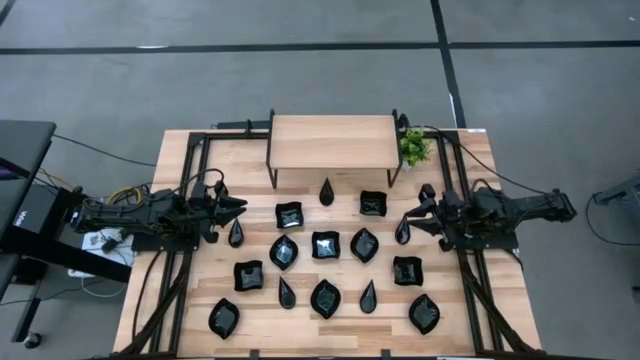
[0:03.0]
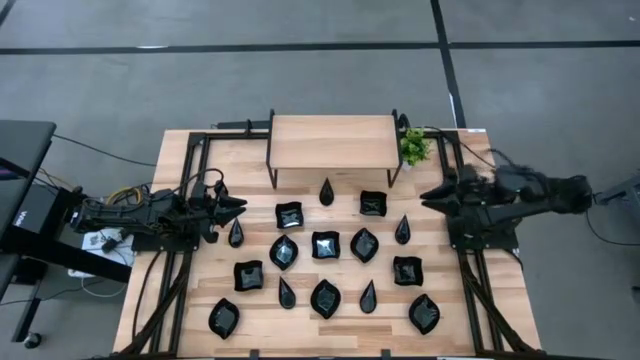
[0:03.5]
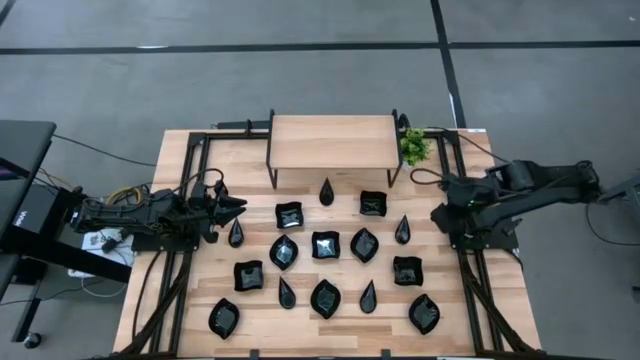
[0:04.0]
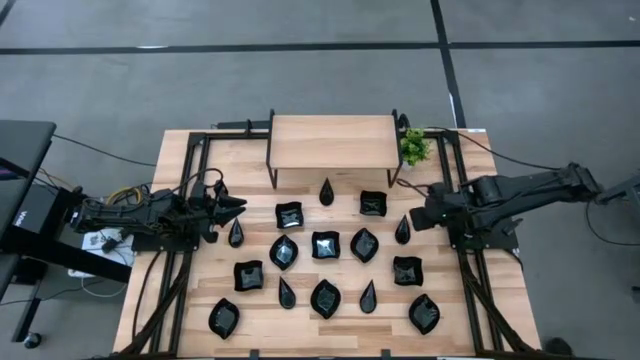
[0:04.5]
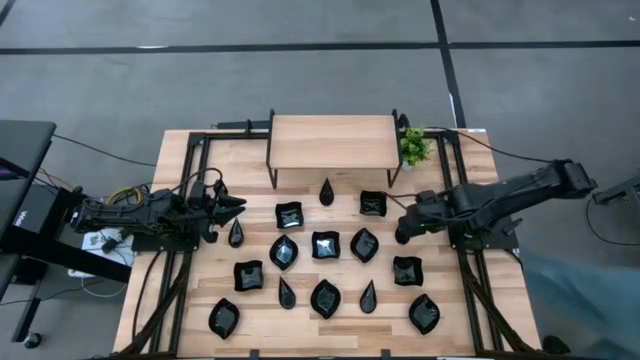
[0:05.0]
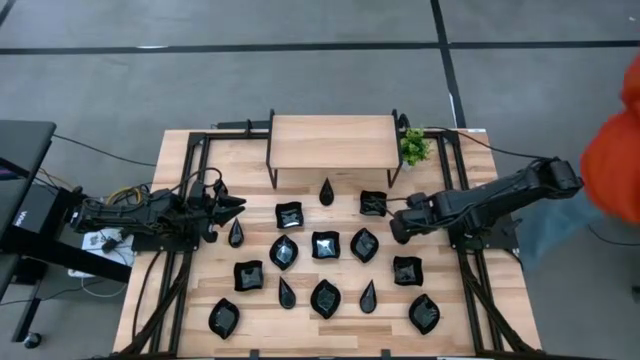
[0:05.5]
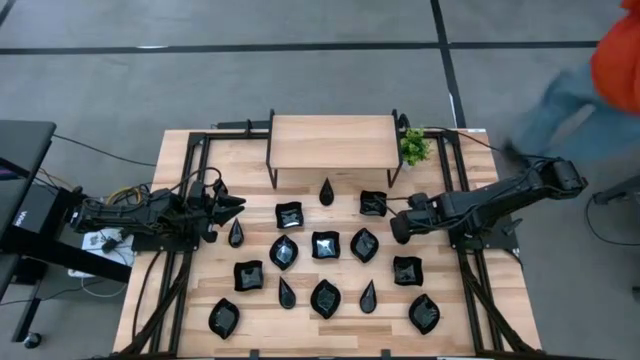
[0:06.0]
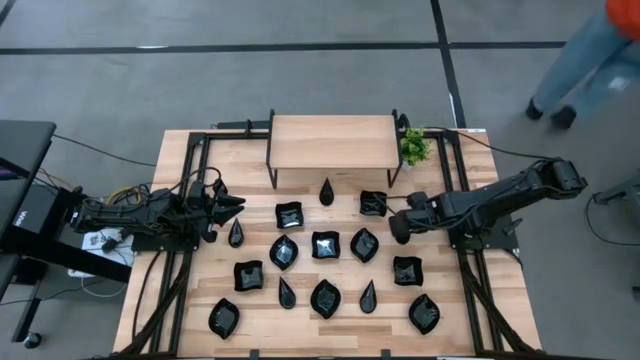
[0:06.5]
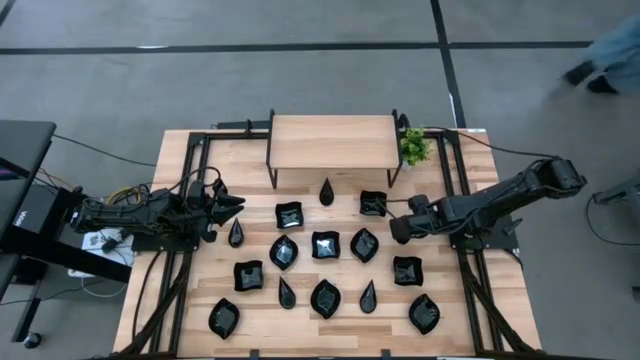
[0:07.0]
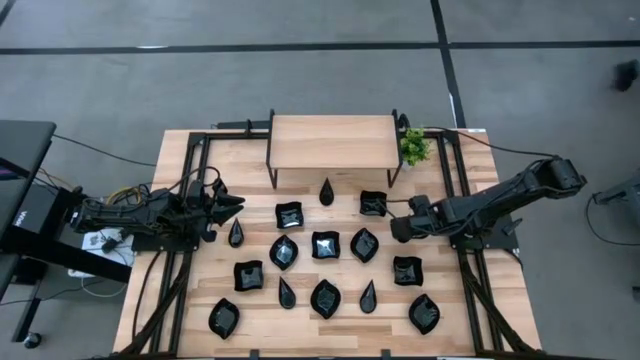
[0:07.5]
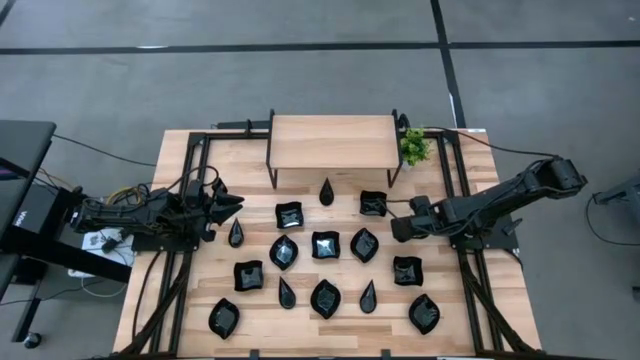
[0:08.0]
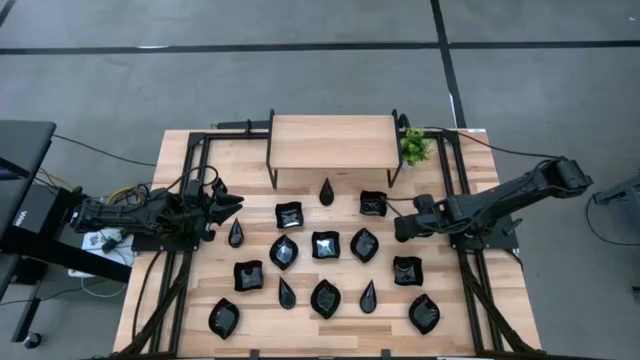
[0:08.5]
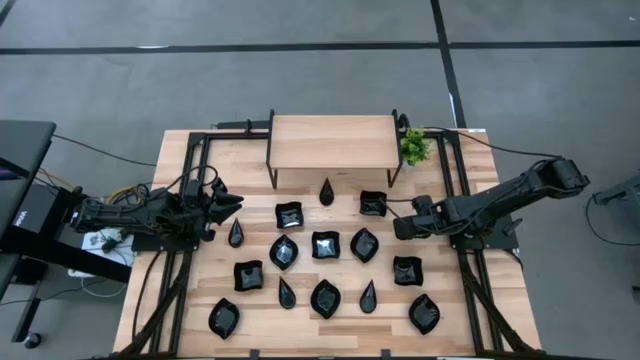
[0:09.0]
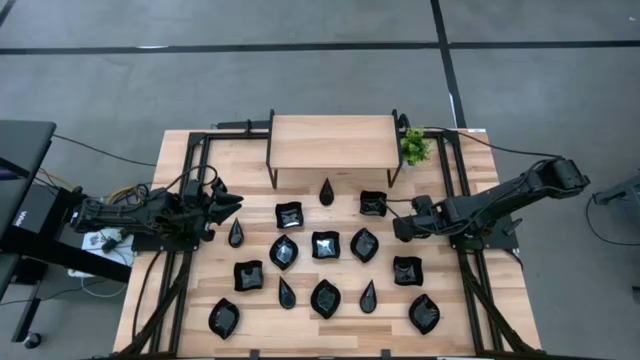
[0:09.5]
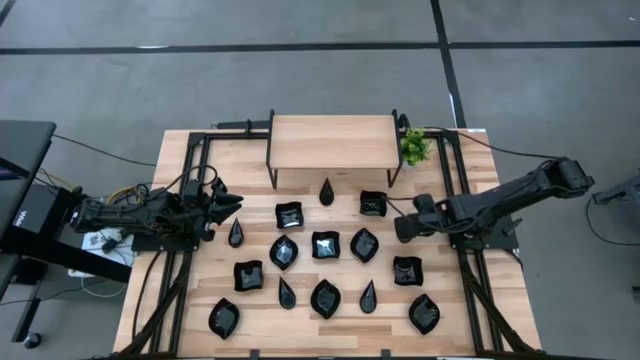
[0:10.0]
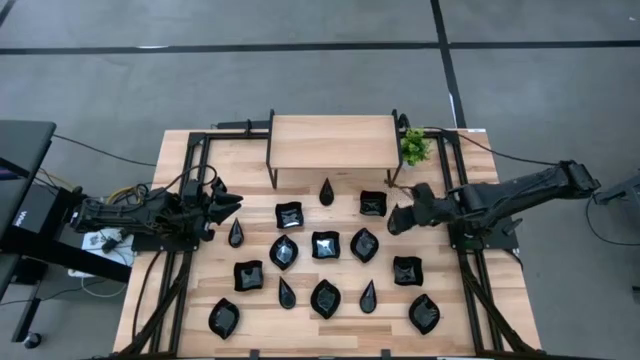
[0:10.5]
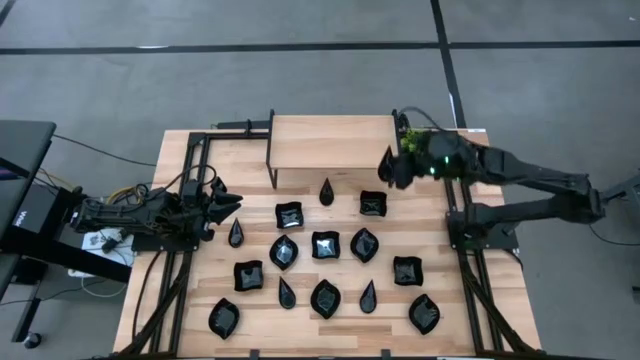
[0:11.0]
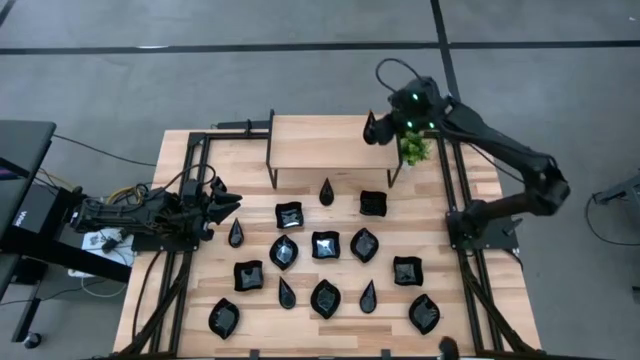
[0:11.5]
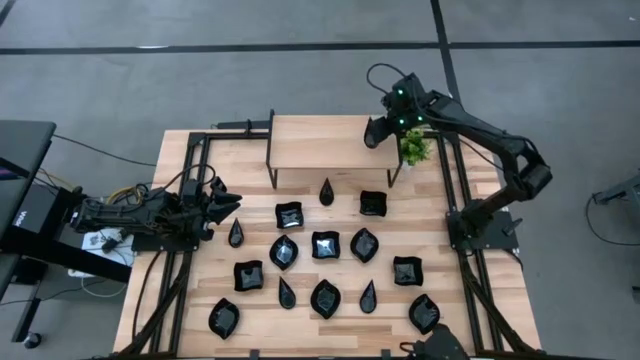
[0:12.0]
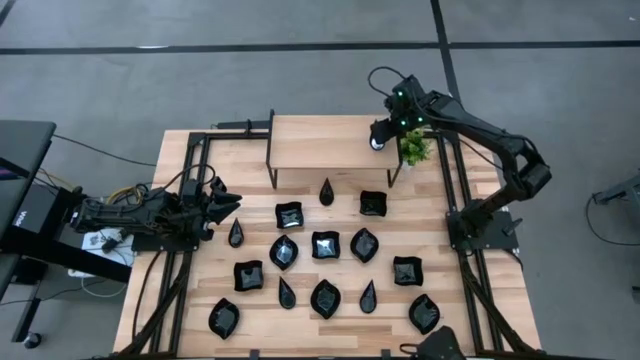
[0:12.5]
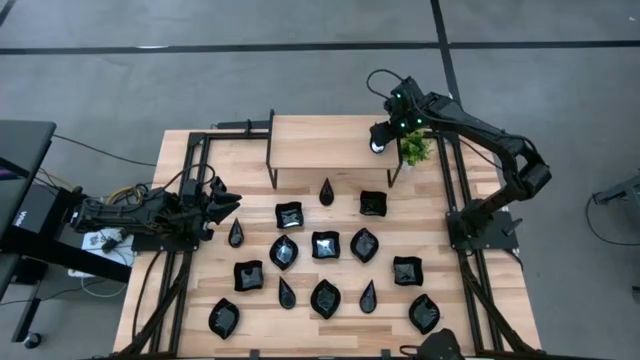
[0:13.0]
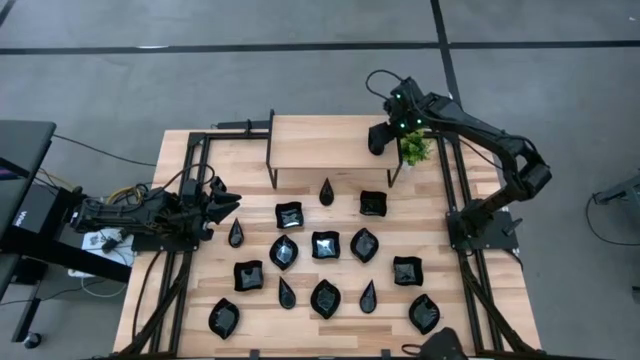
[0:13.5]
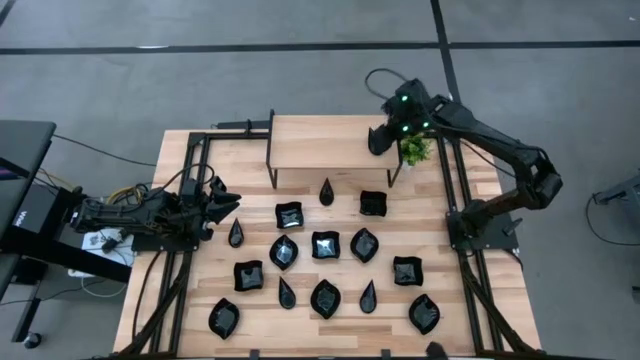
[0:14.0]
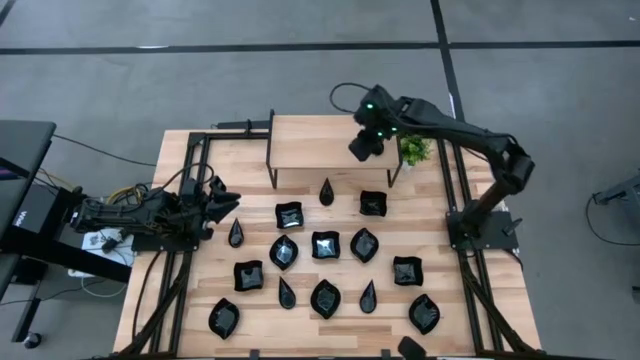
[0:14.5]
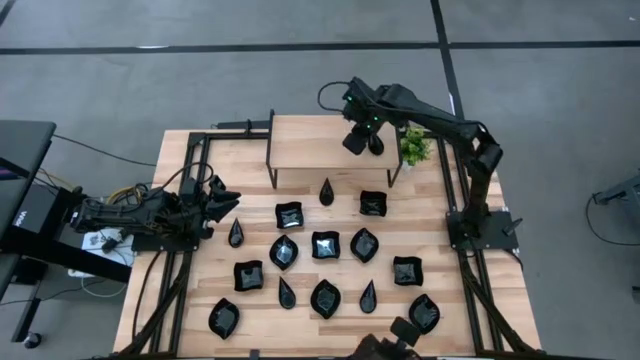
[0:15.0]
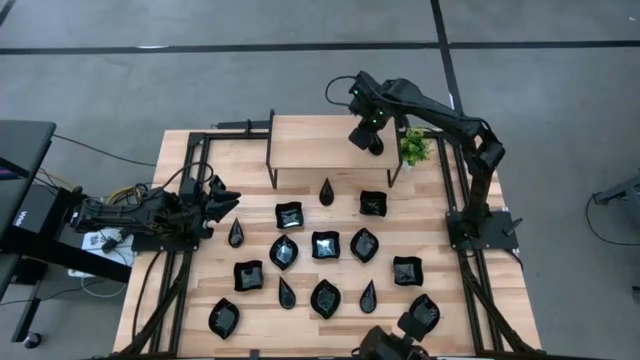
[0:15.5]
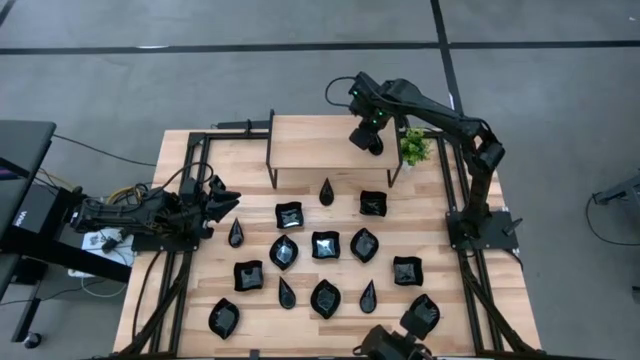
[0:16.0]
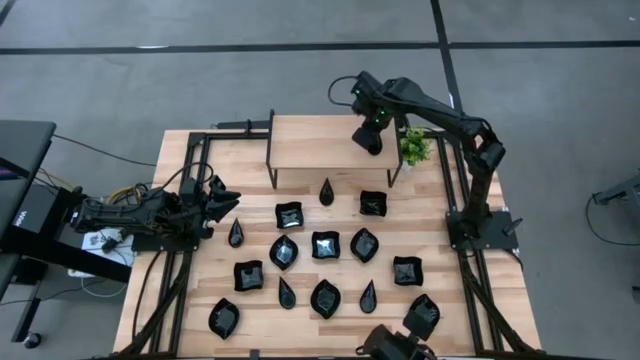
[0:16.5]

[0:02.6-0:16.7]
Task: Pick & Place Mini shaped plates
Put the drop-shaped plate on top of the shelf
